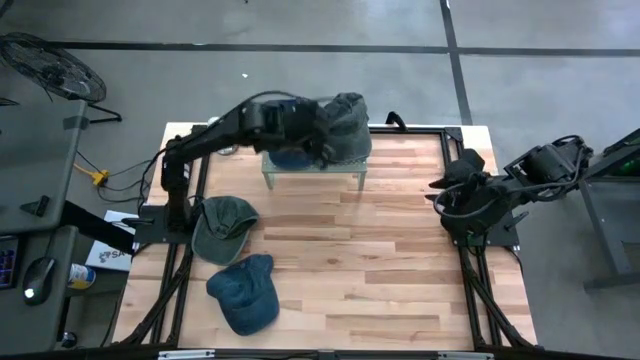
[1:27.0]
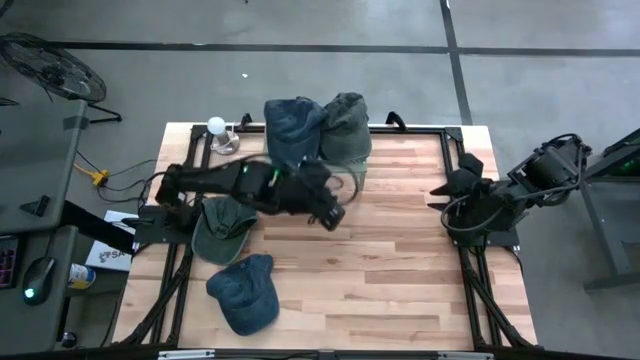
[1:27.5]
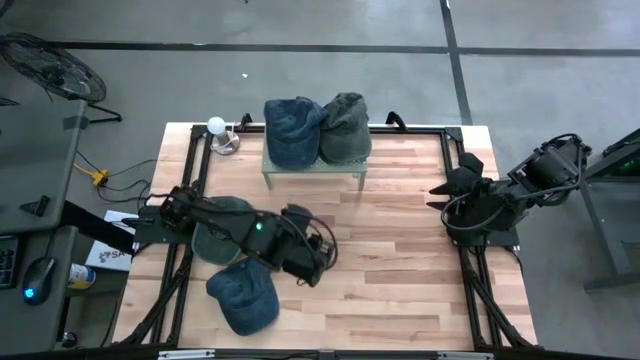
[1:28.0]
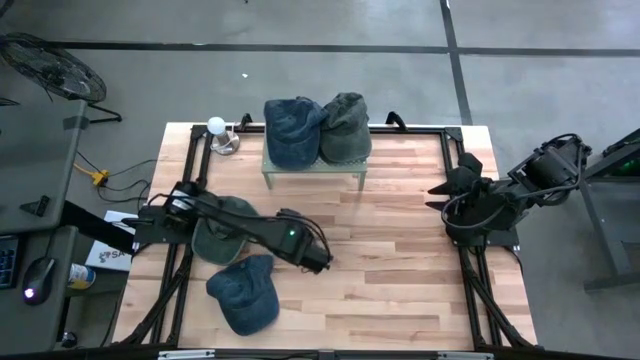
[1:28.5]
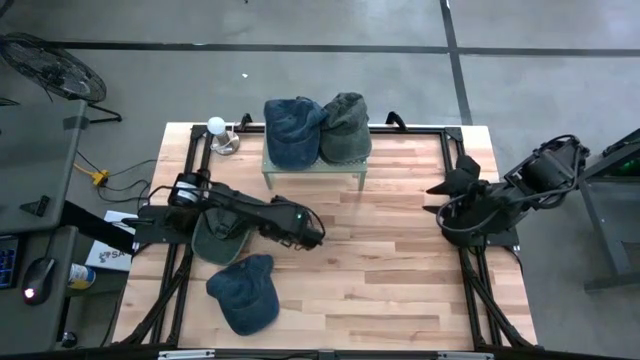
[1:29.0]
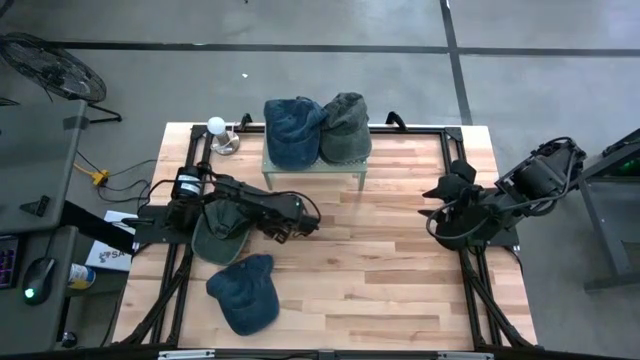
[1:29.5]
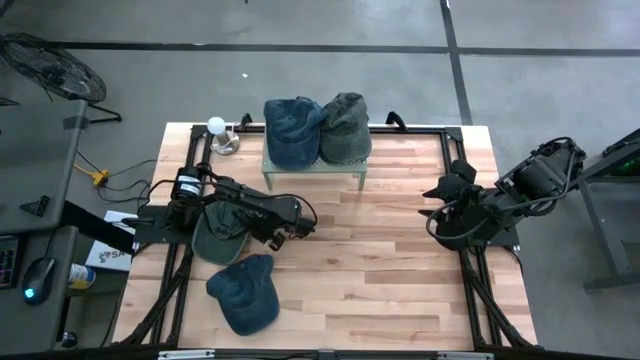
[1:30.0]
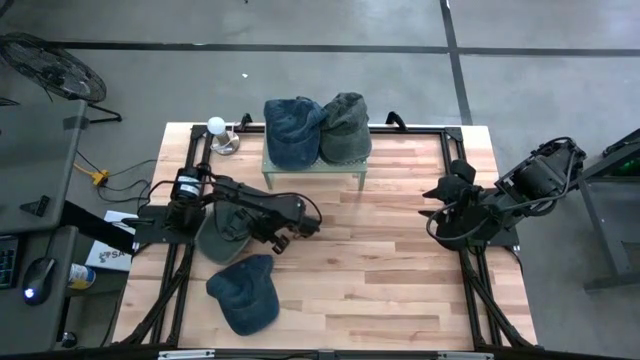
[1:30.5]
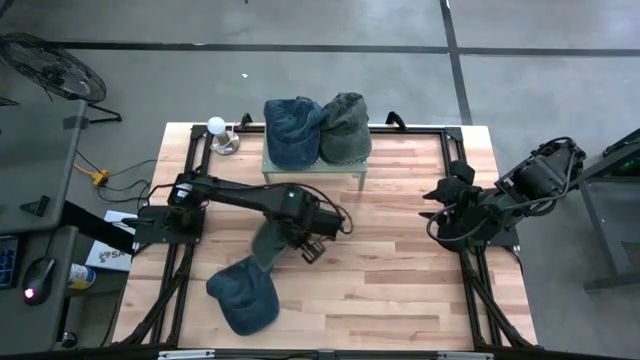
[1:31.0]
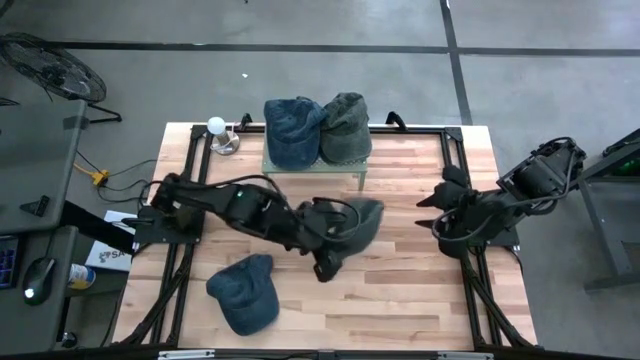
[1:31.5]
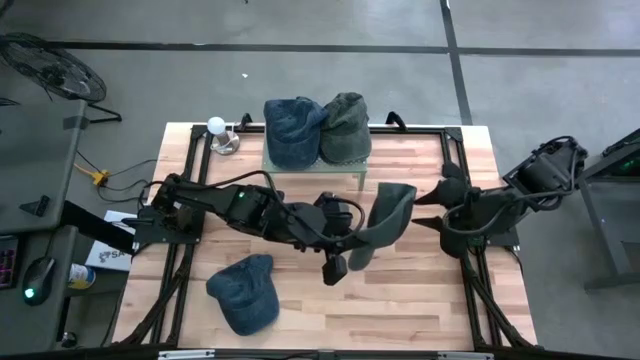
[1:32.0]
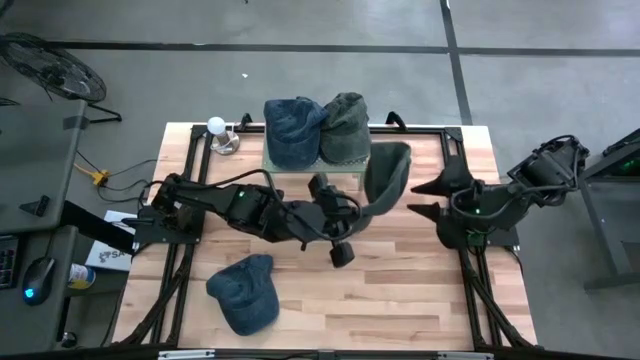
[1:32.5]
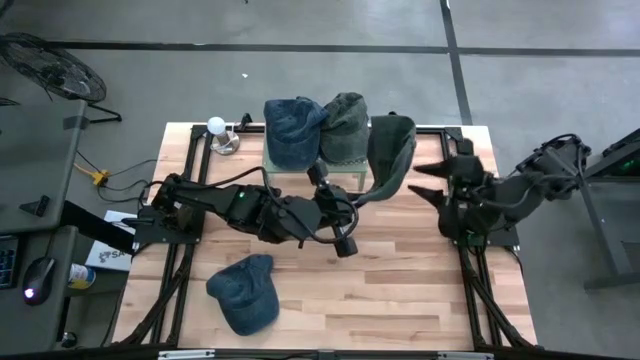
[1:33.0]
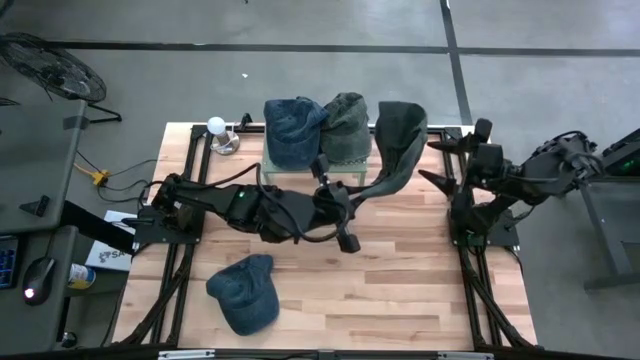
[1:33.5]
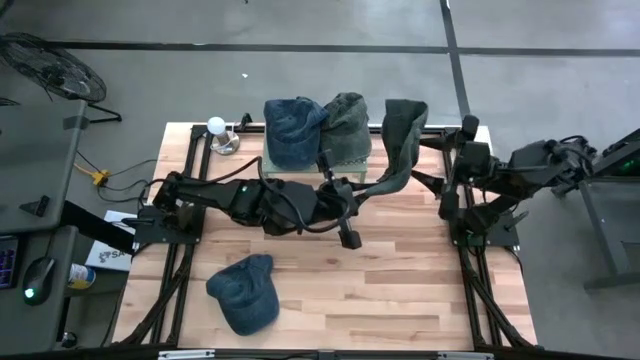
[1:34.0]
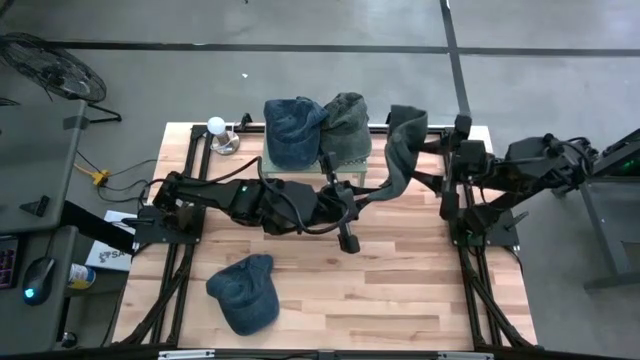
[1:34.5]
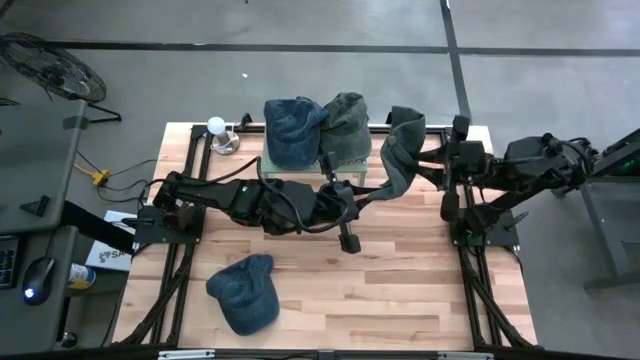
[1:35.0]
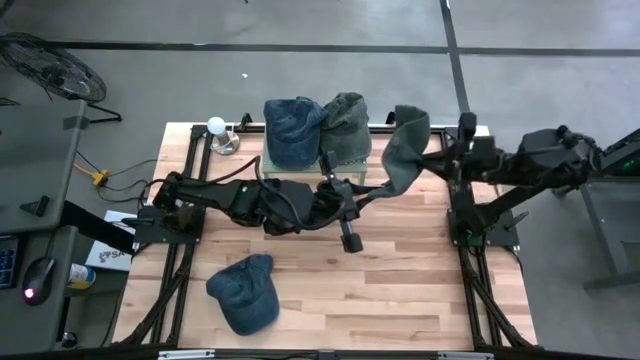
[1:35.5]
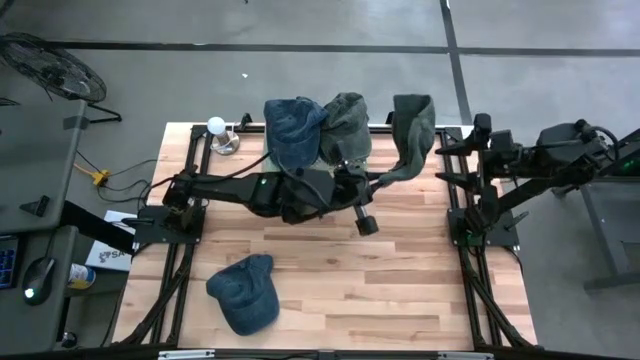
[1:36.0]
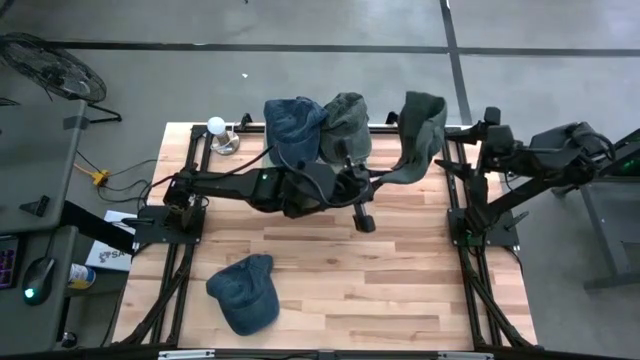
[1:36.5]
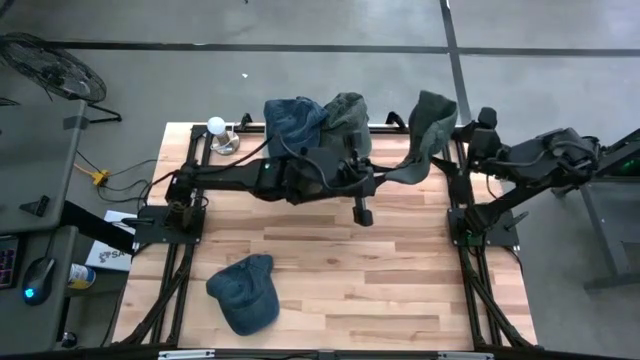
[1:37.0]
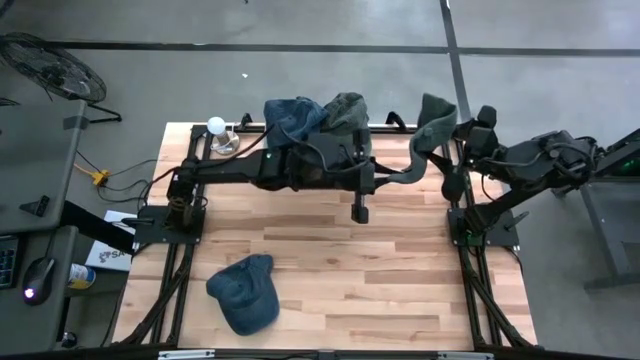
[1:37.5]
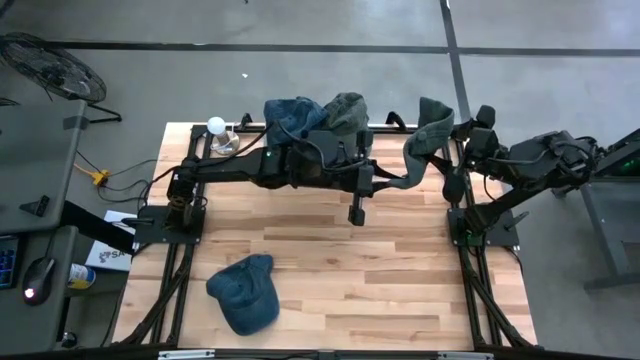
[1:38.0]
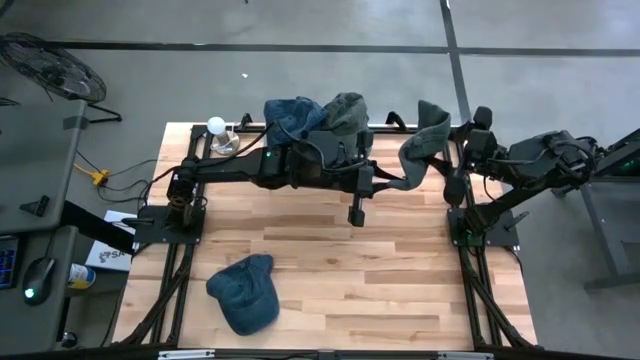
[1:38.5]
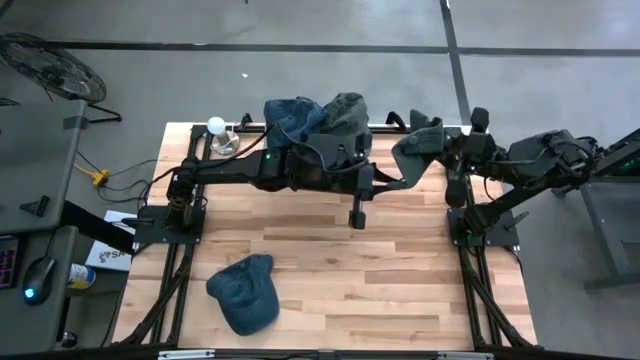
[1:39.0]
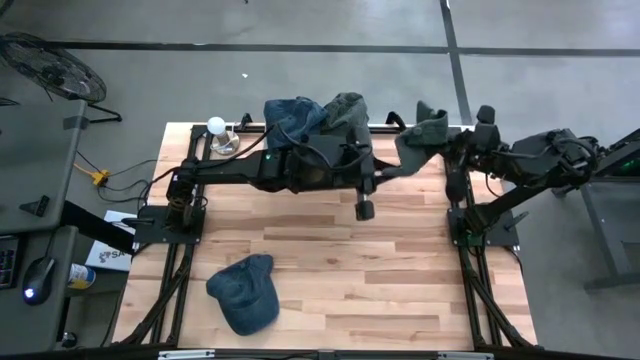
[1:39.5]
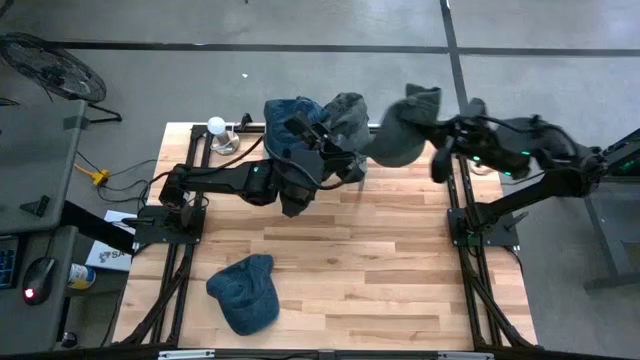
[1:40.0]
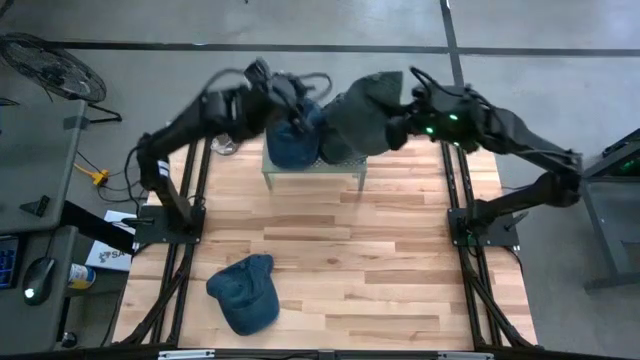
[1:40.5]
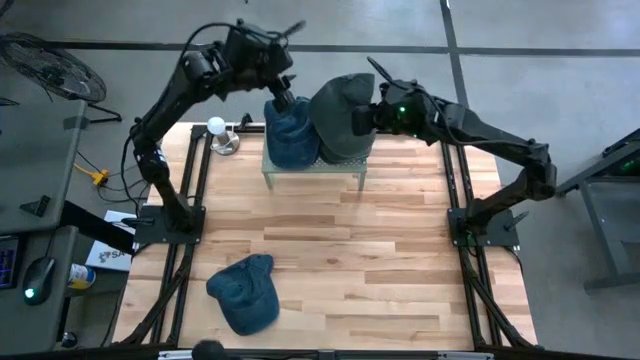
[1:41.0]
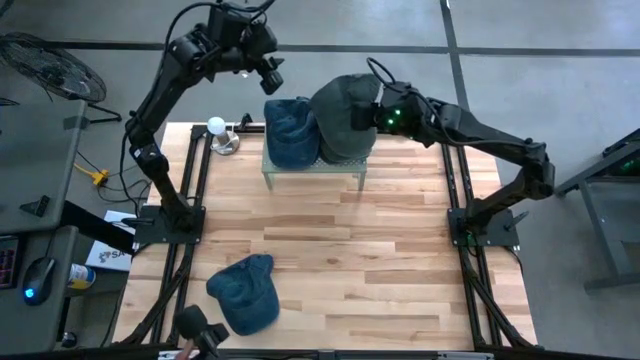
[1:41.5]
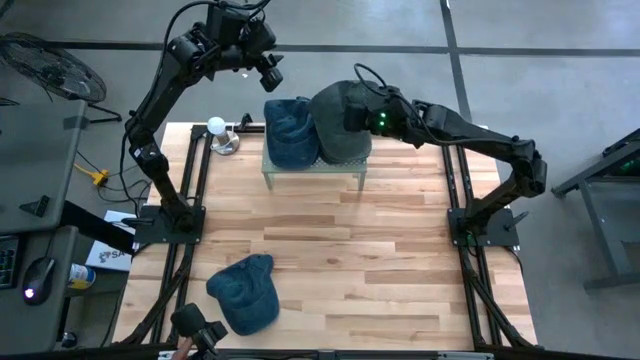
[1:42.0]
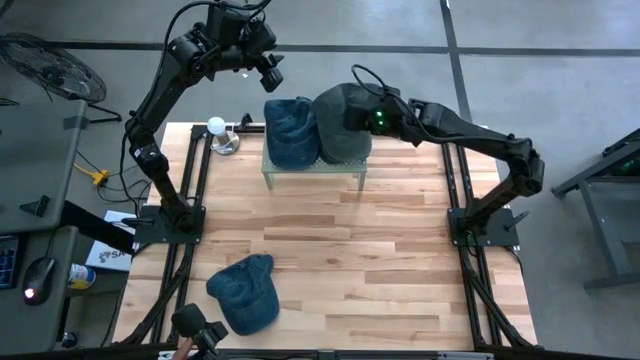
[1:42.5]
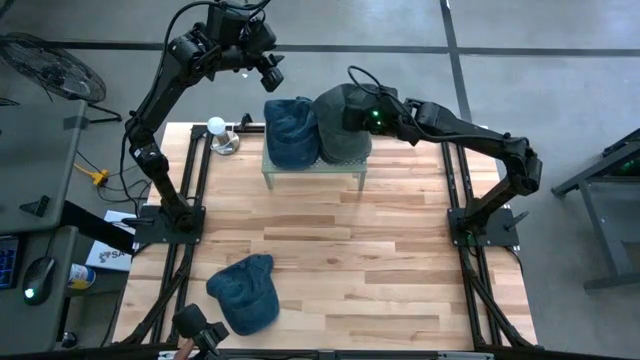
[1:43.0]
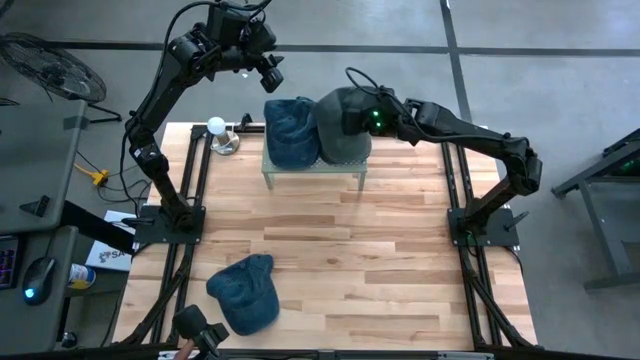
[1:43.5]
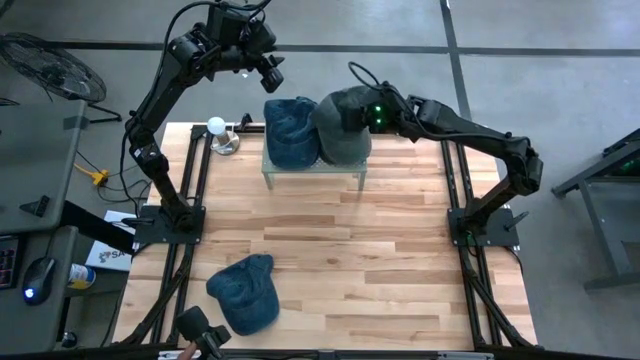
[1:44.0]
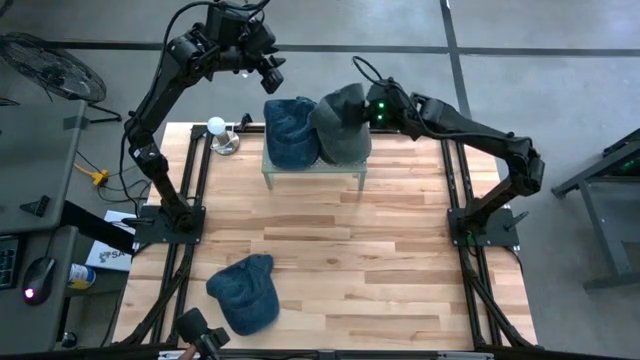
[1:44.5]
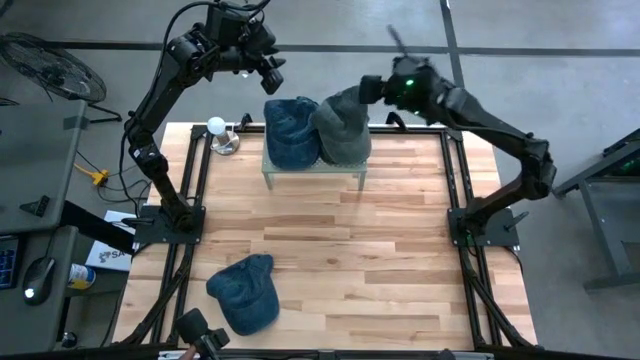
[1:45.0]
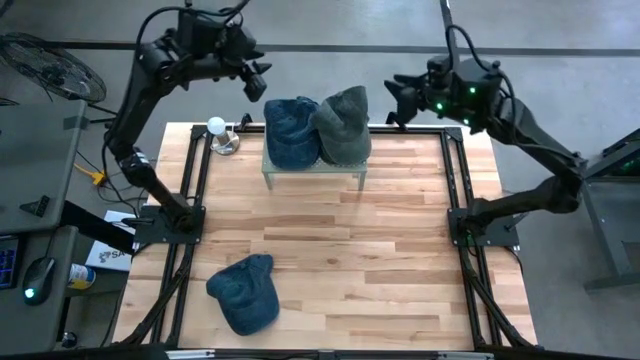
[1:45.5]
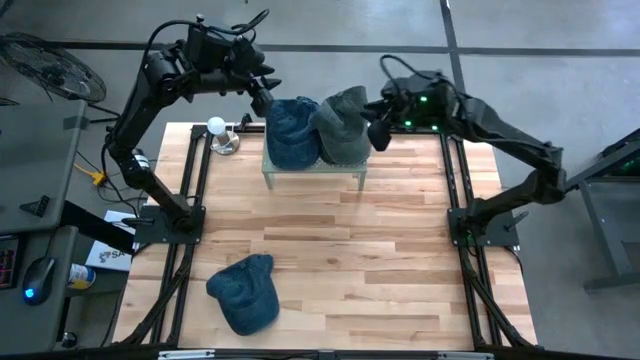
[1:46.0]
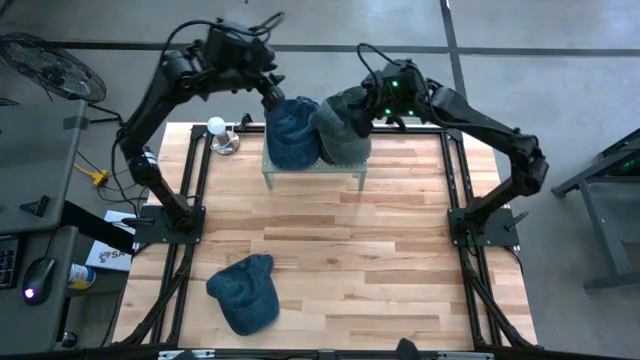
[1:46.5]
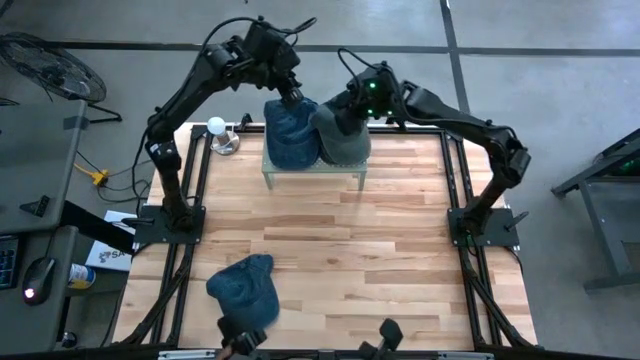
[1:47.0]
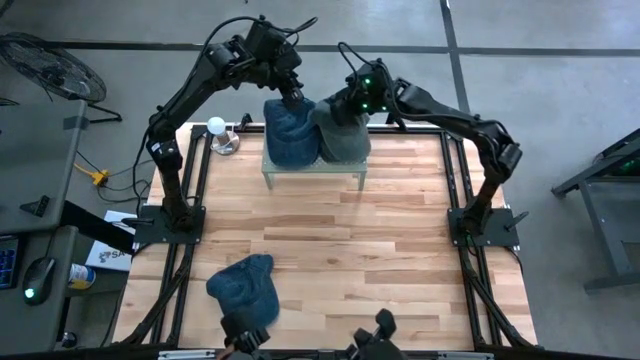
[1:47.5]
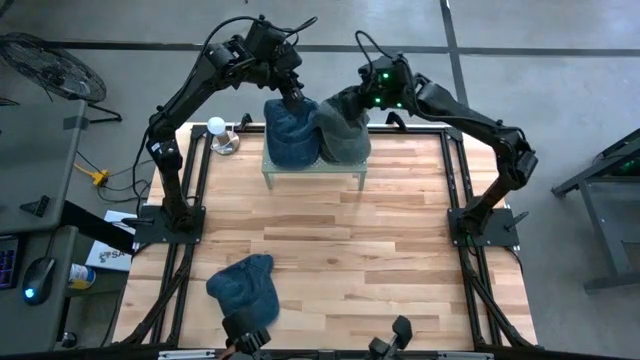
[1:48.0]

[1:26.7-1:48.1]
Task: Pick & Place hat
Stack the gray cap on the stacked gray cap on the shelf
